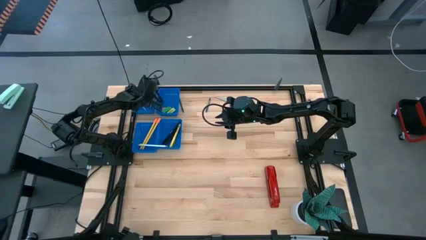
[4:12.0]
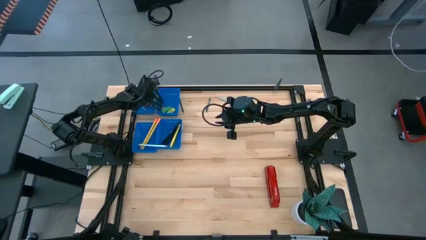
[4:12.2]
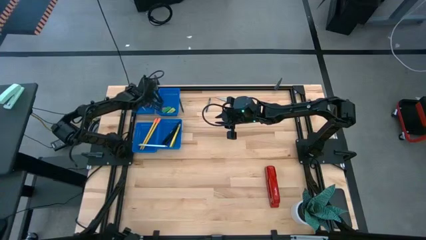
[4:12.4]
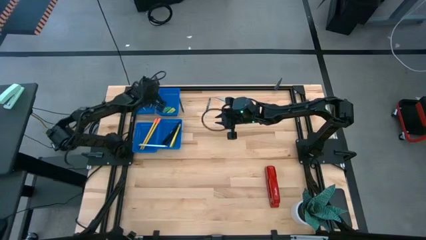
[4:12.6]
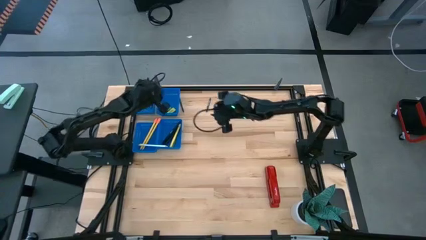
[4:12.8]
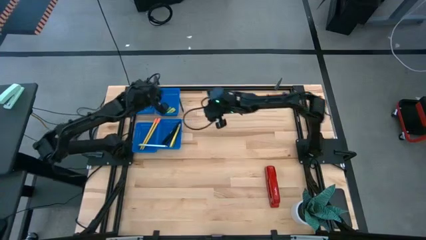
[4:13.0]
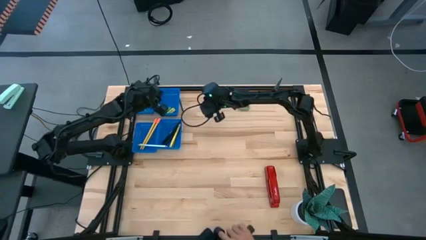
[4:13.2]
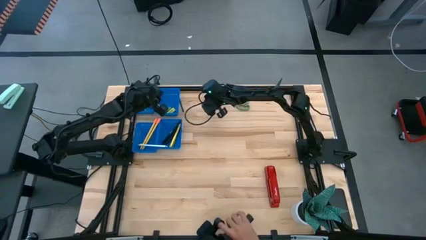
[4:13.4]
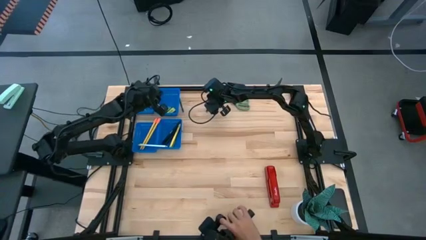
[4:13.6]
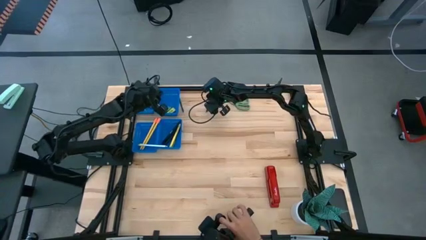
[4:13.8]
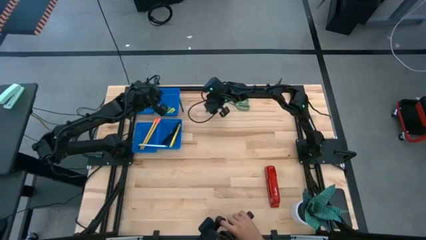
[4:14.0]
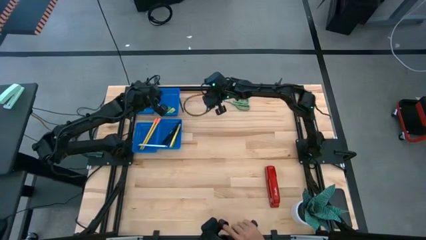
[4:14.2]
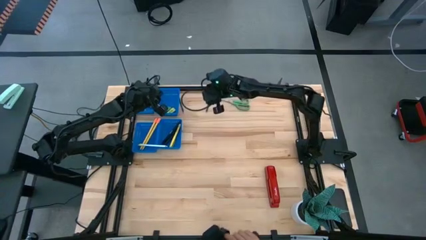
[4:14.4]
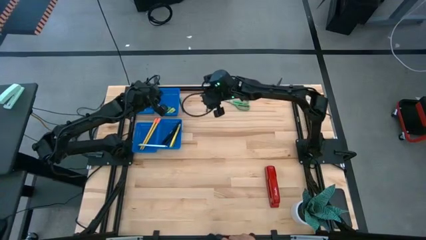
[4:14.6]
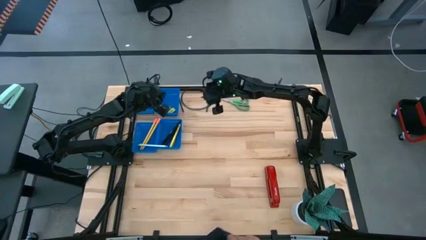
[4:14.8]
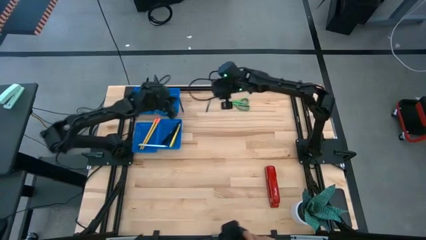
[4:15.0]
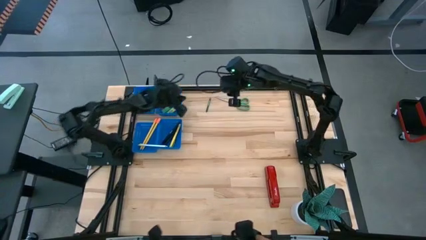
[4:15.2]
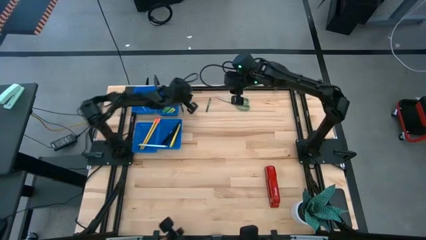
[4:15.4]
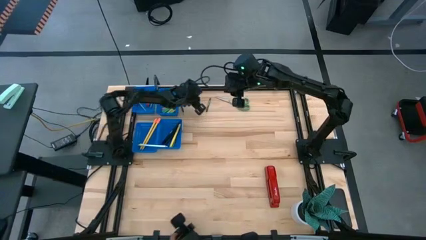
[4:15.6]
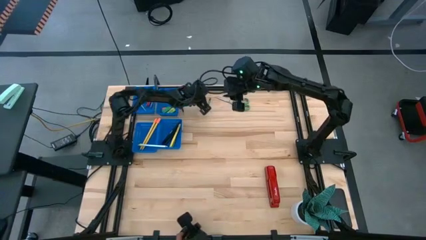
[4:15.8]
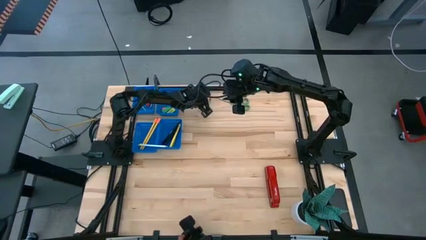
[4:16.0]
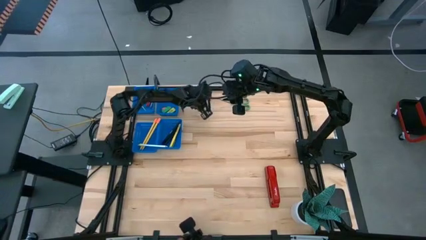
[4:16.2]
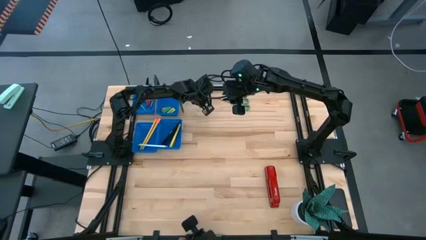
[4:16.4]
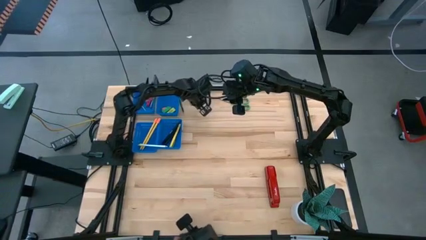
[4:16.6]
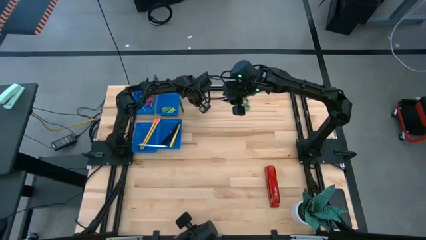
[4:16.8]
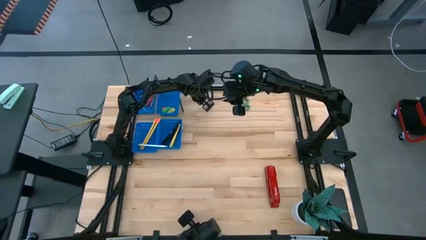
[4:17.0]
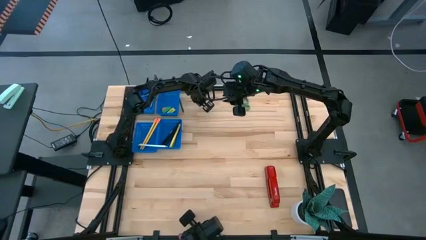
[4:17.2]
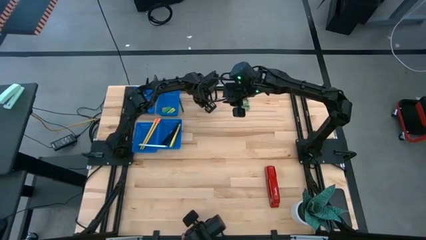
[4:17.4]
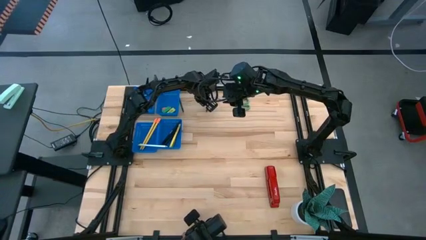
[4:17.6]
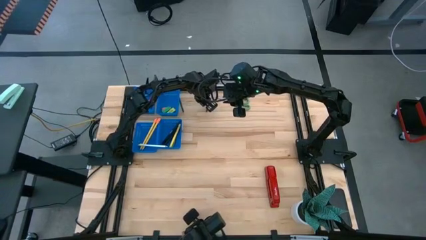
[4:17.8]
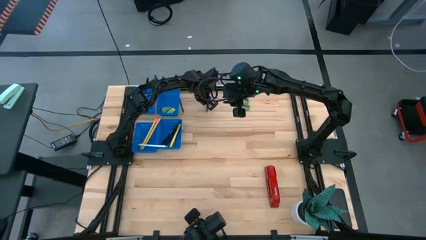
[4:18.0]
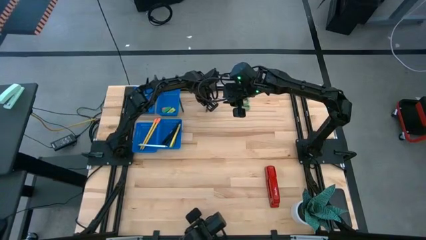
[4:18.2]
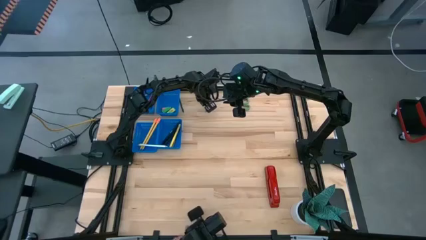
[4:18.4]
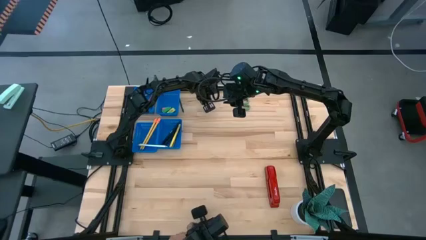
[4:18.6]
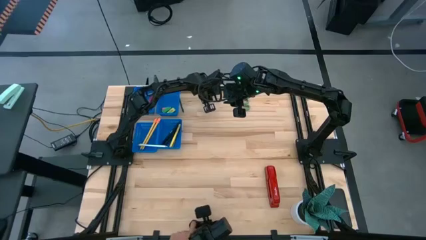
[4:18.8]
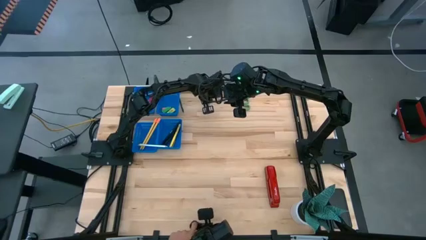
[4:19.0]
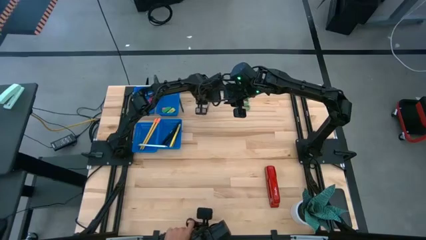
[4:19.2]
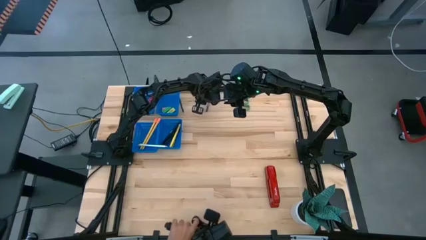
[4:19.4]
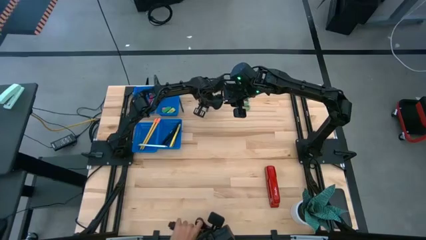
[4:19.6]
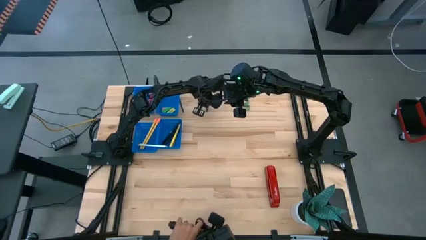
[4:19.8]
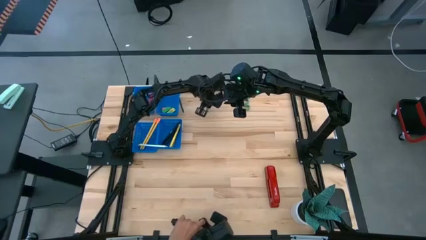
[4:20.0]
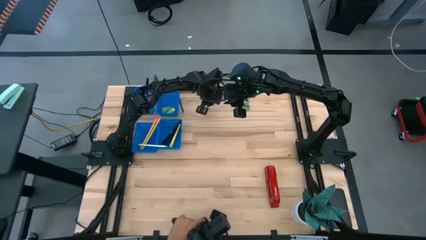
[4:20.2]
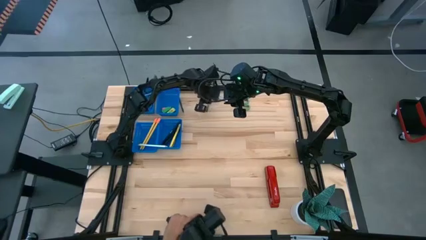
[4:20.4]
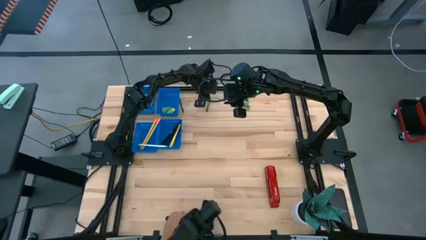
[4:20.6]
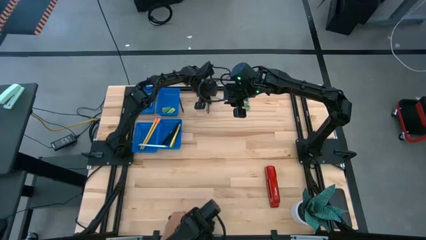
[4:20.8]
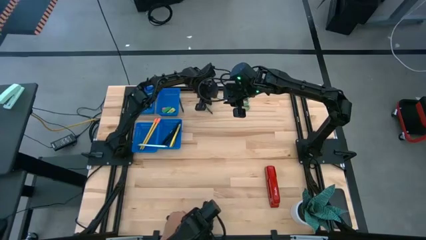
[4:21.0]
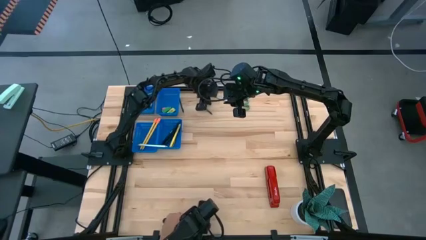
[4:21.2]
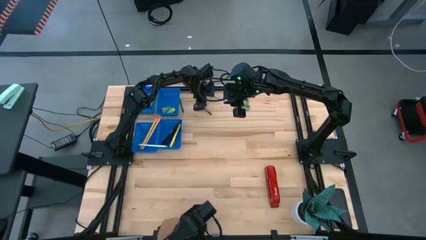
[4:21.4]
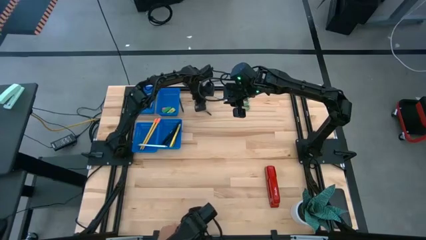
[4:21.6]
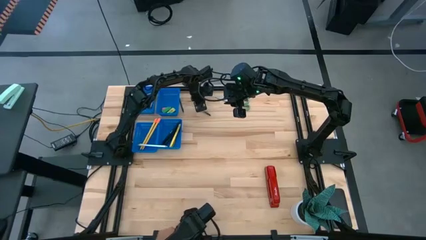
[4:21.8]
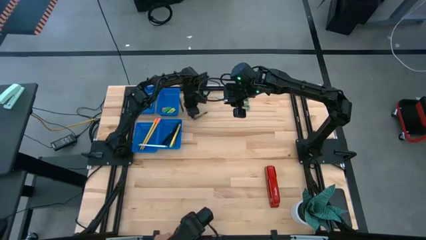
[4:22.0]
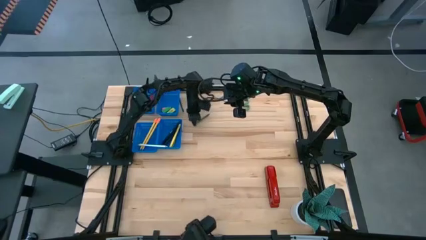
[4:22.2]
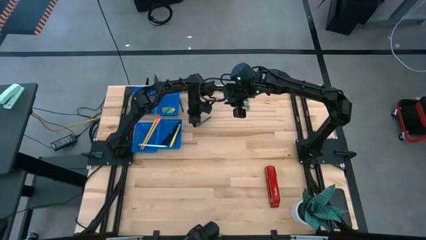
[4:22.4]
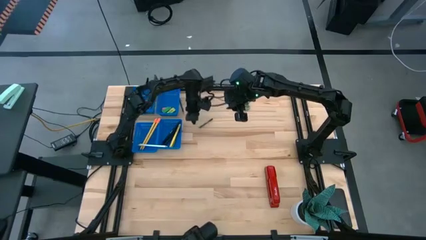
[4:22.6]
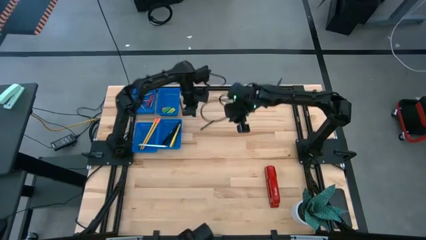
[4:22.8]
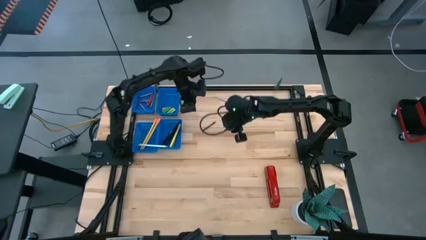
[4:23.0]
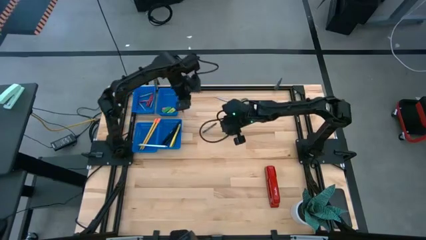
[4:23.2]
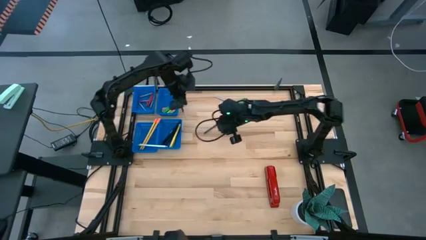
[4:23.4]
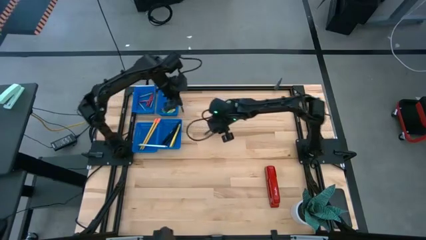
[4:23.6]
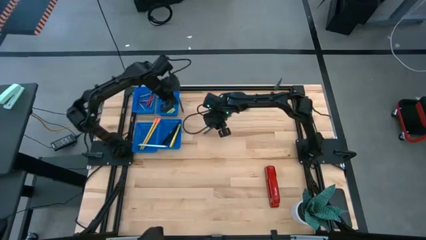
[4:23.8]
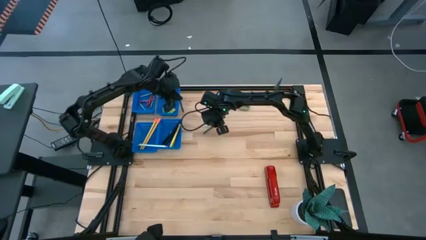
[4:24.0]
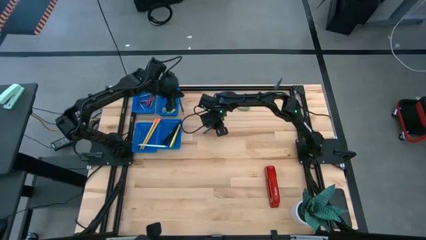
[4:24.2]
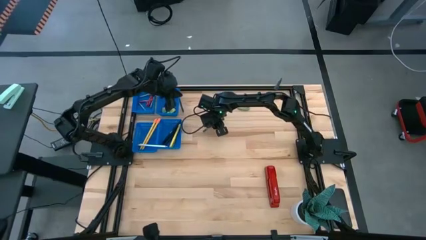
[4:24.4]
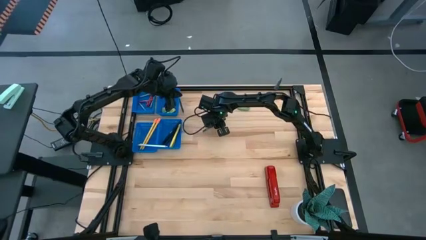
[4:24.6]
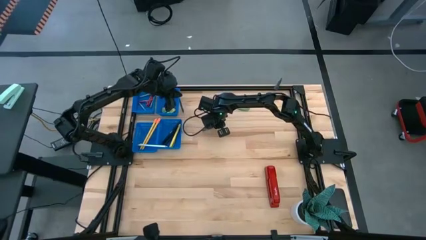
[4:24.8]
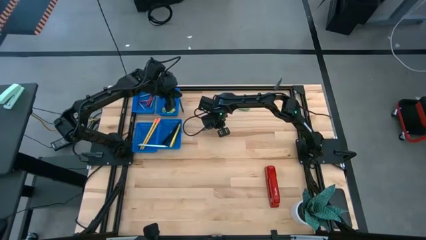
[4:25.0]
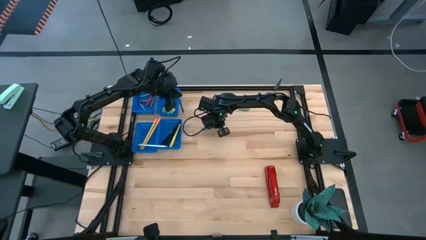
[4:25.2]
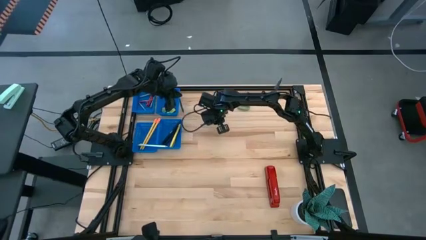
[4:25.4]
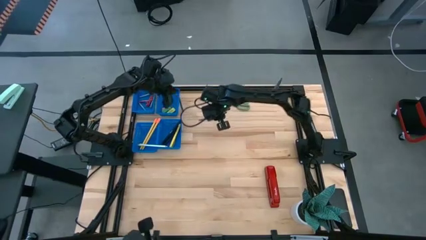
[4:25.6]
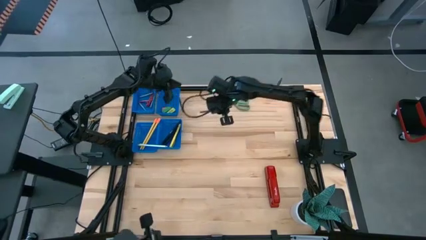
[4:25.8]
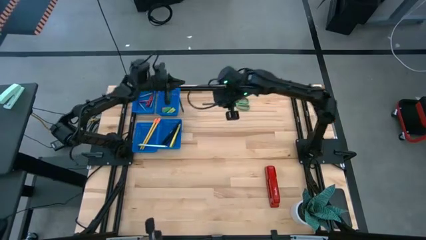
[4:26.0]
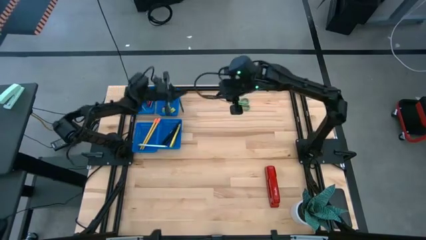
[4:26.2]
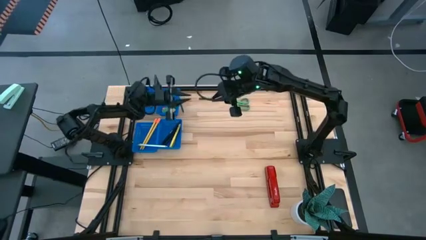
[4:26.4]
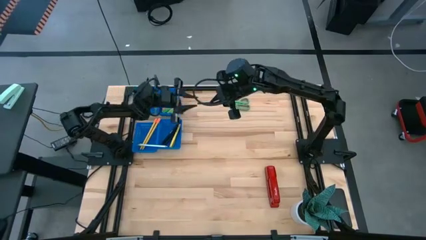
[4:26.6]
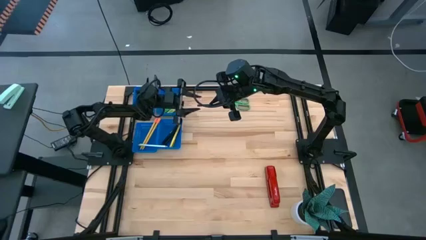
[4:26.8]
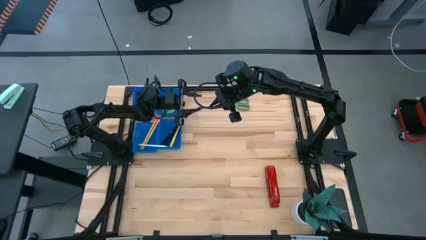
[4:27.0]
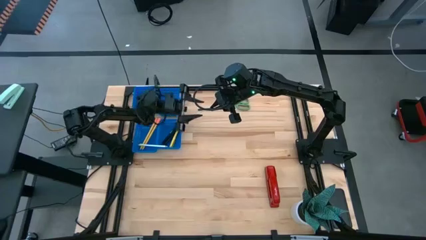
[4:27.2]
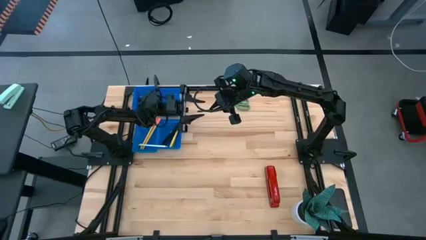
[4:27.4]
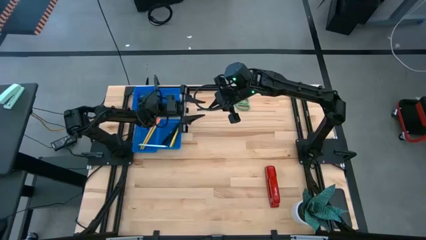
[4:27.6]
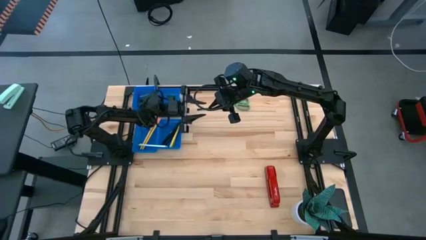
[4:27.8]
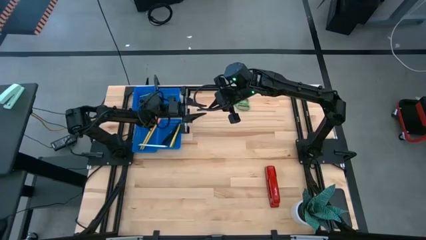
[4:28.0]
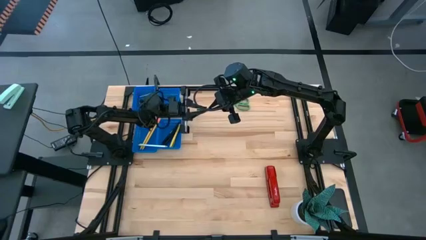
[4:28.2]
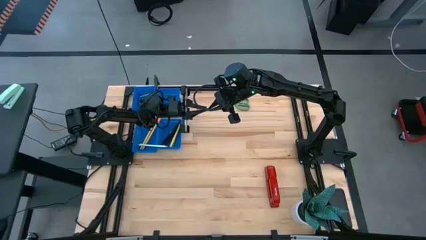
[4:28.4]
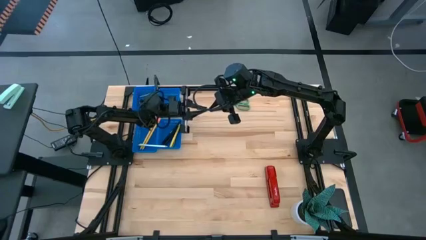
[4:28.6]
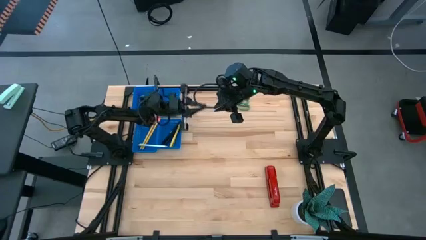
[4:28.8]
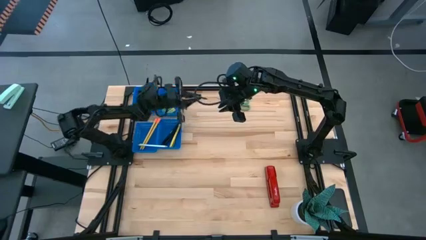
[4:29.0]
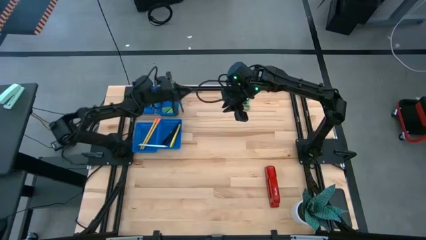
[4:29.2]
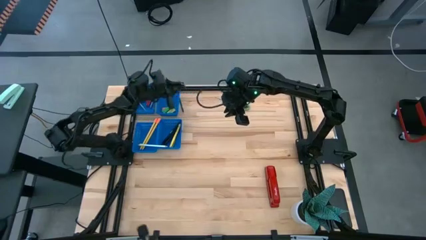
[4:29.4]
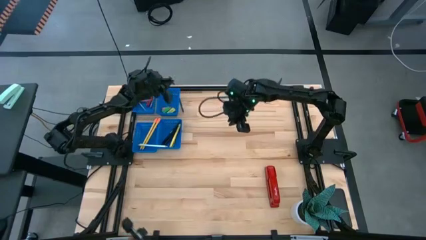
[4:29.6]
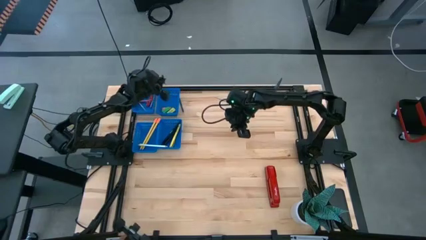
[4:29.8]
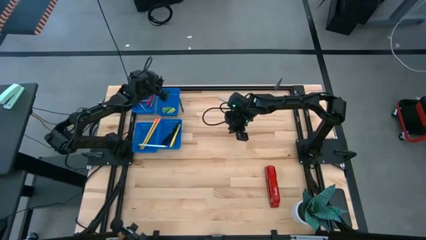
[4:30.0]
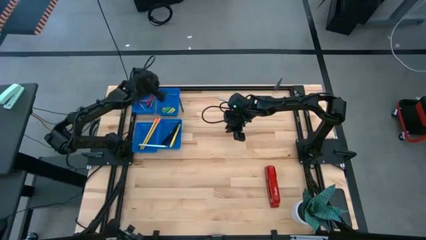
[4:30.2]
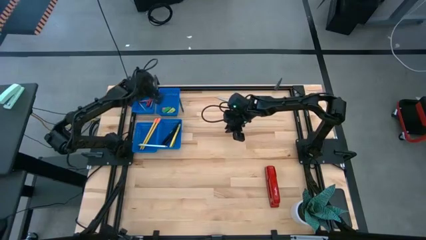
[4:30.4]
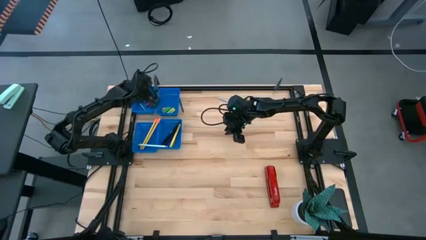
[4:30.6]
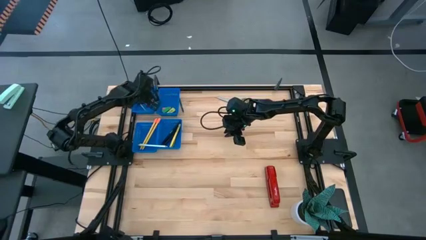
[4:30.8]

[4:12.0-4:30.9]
Task: Sort crayons/erasers/pens/pencils in bins
Put the green crayon into the top left blue bin
